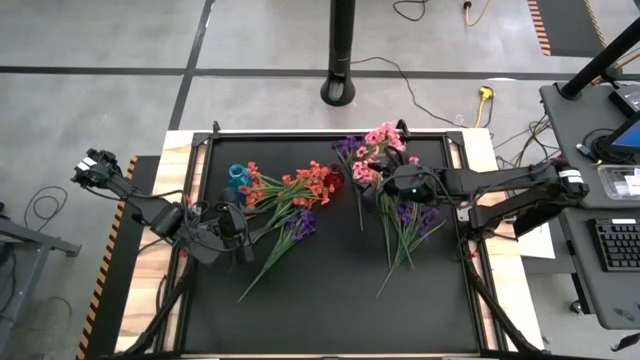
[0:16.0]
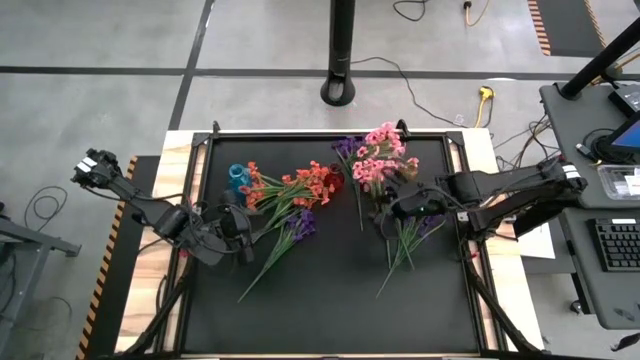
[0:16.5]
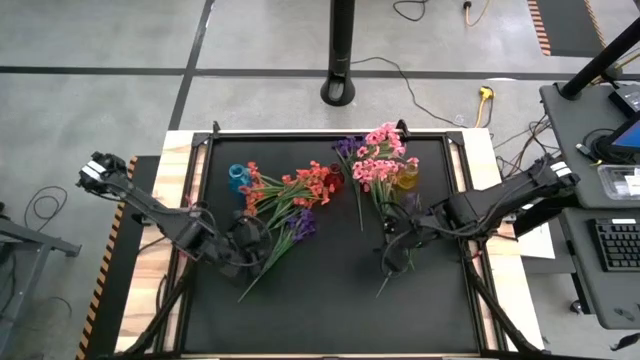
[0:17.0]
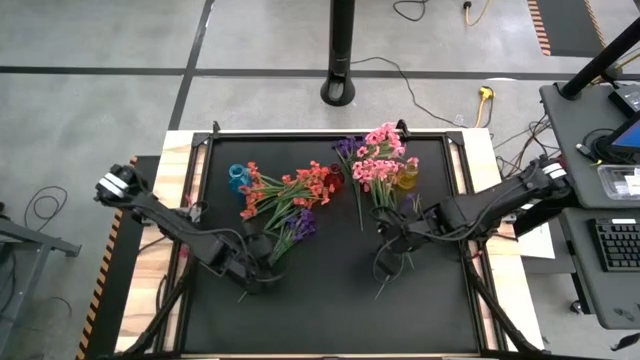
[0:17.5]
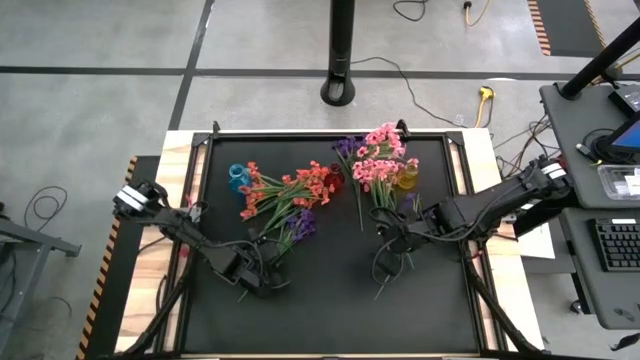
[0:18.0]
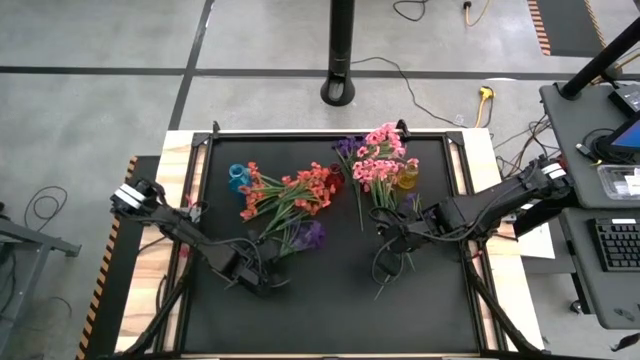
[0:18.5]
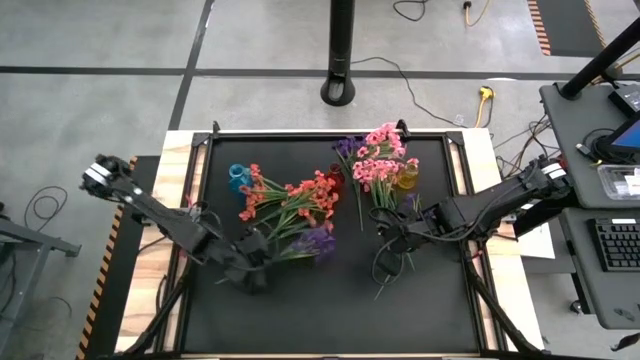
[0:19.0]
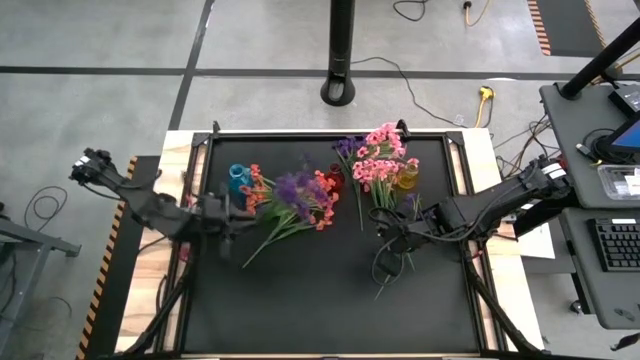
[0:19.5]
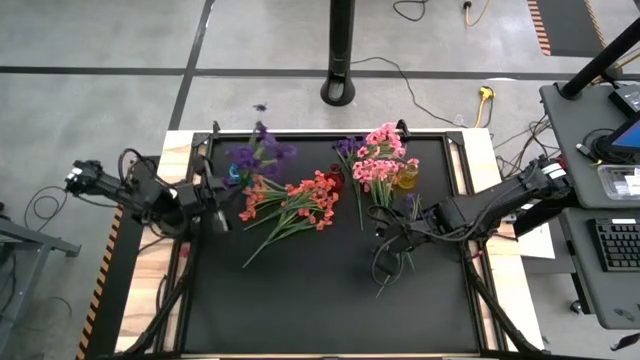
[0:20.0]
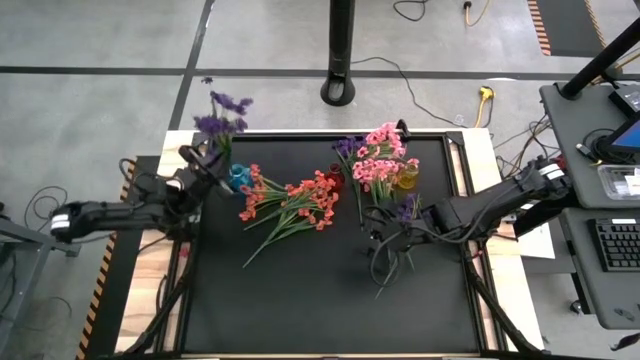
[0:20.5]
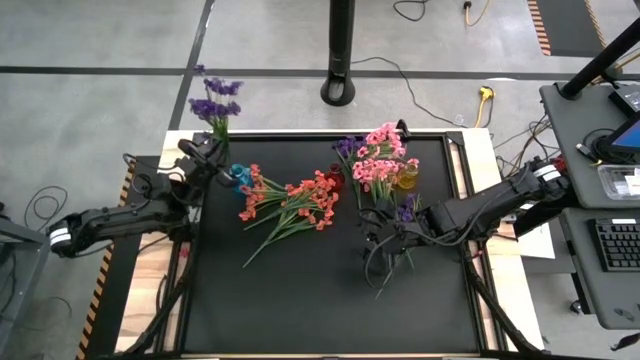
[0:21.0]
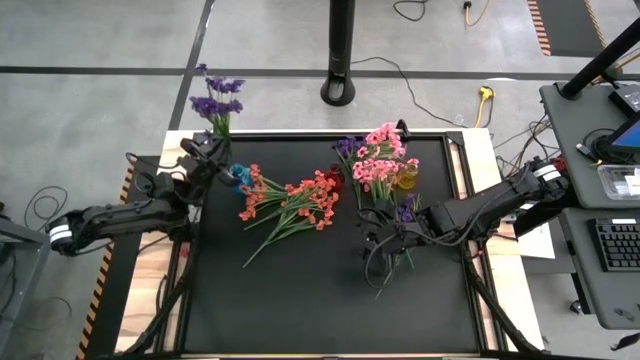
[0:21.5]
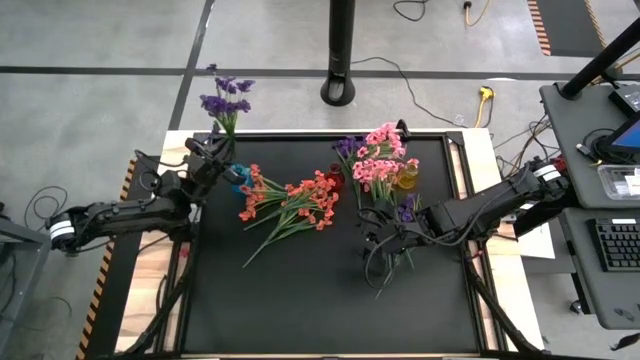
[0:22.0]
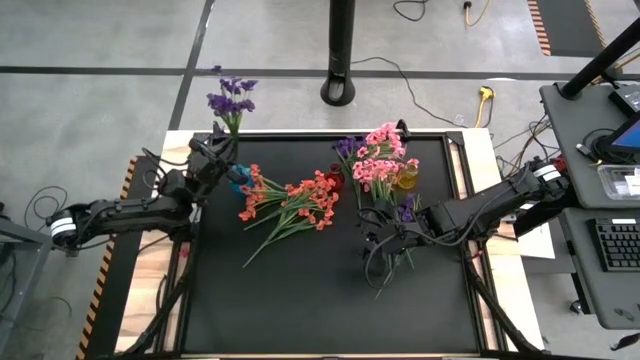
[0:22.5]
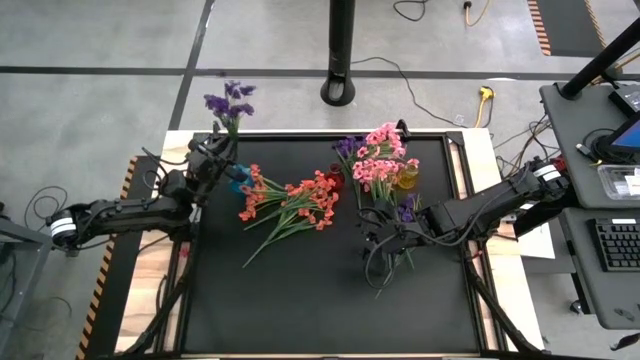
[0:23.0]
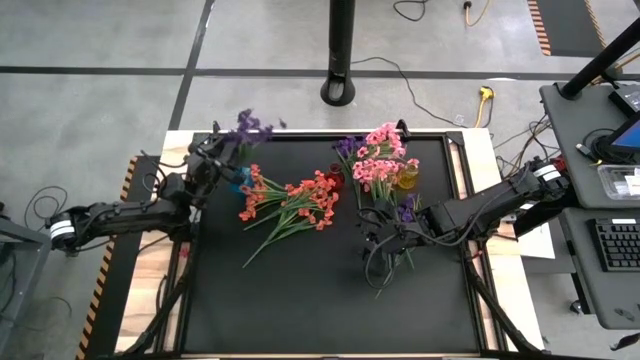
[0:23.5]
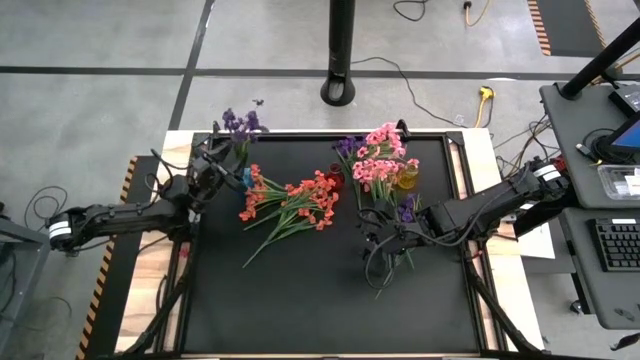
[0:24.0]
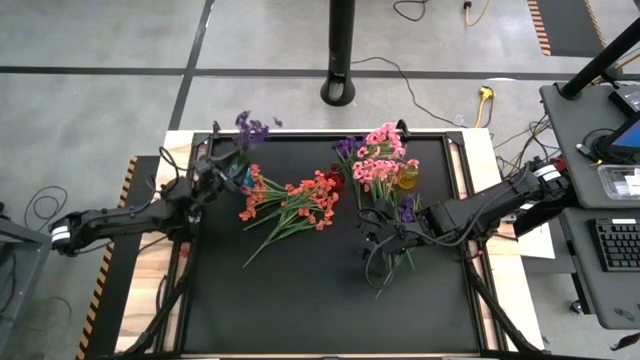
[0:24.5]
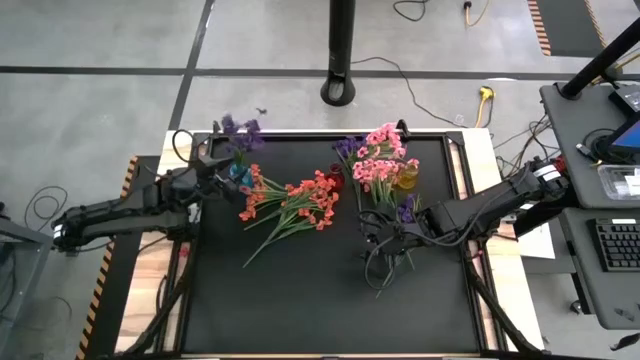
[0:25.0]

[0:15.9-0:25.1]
Task: Sort flowers into vase by color
Put the bottom left purple flower into the blue vase

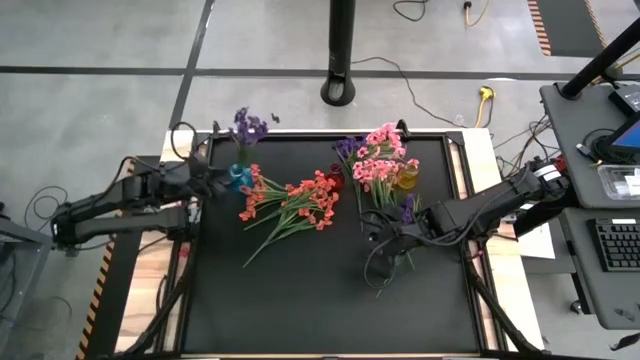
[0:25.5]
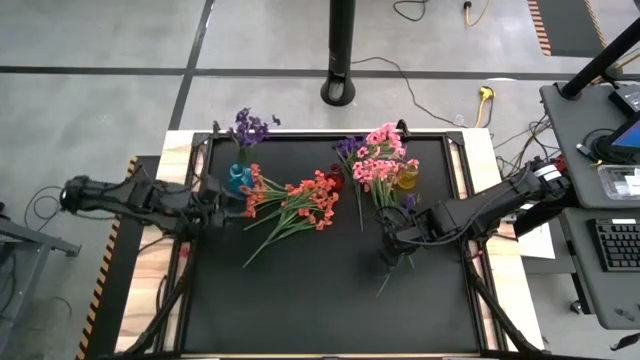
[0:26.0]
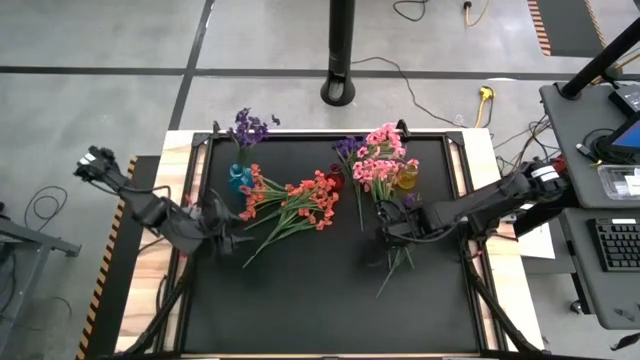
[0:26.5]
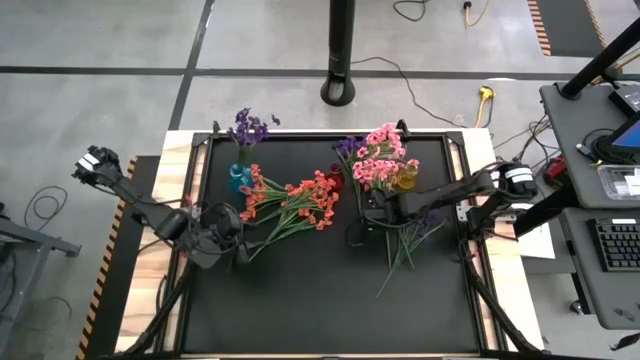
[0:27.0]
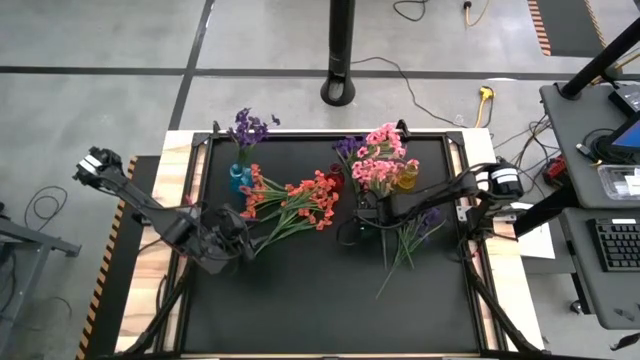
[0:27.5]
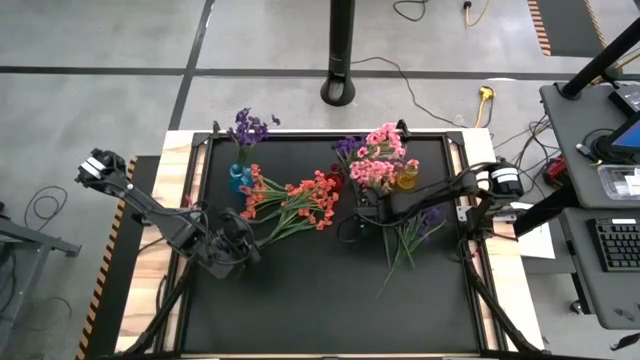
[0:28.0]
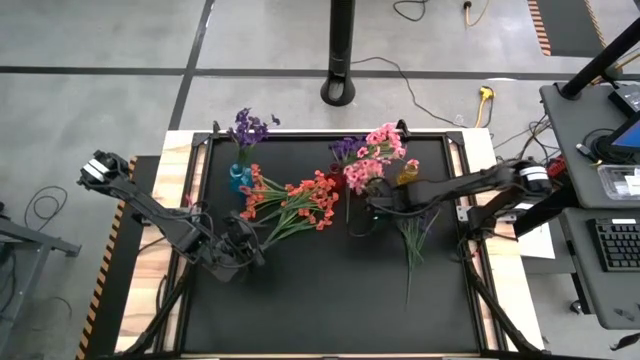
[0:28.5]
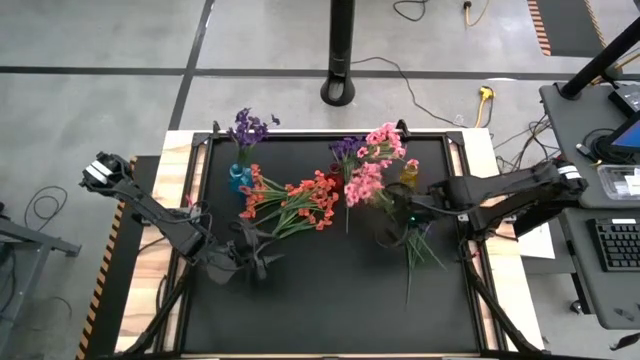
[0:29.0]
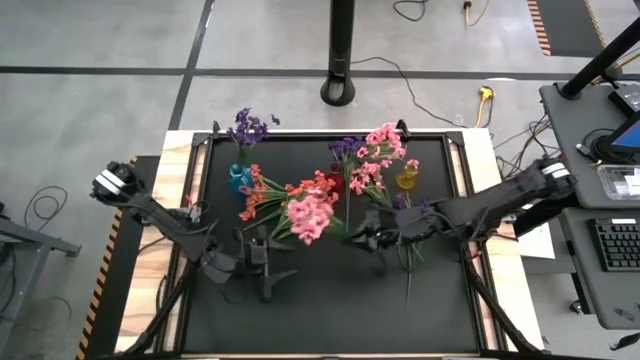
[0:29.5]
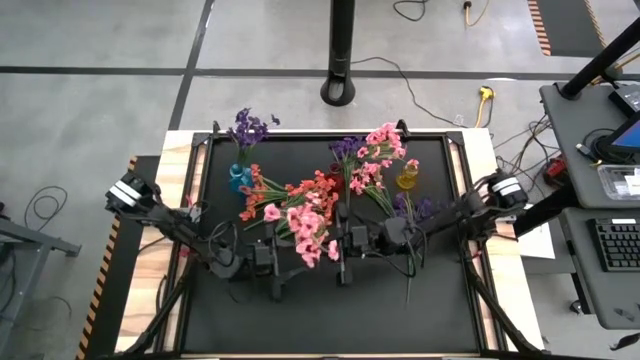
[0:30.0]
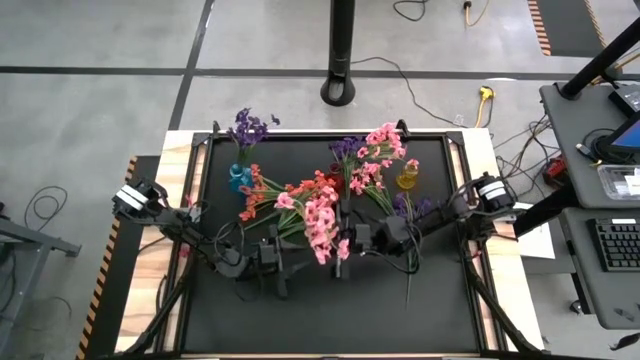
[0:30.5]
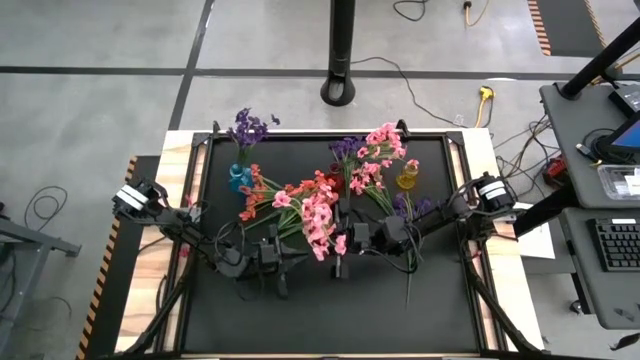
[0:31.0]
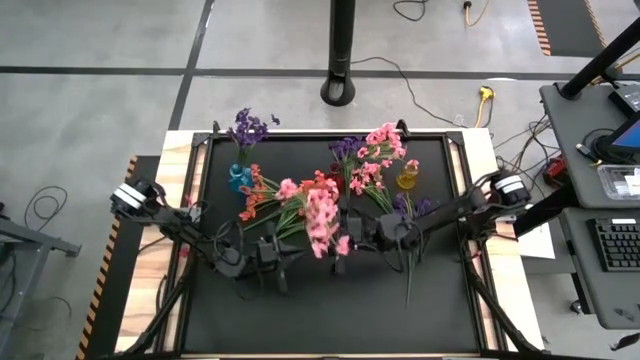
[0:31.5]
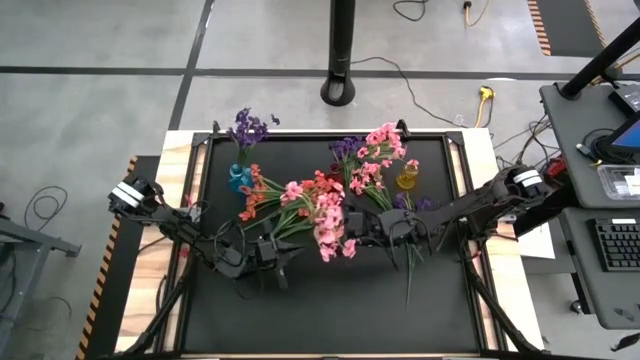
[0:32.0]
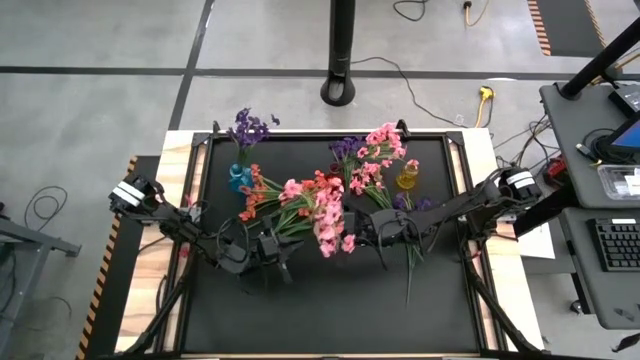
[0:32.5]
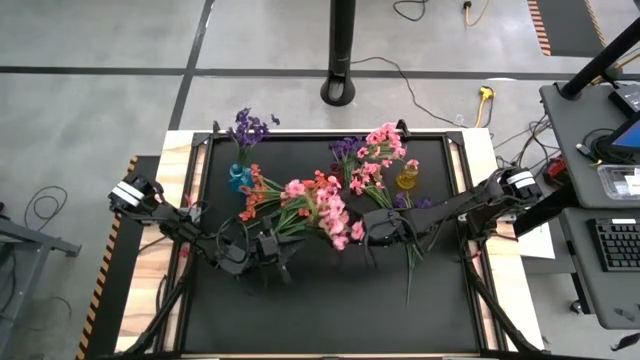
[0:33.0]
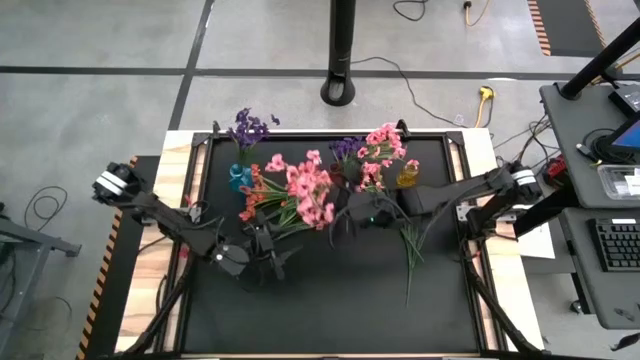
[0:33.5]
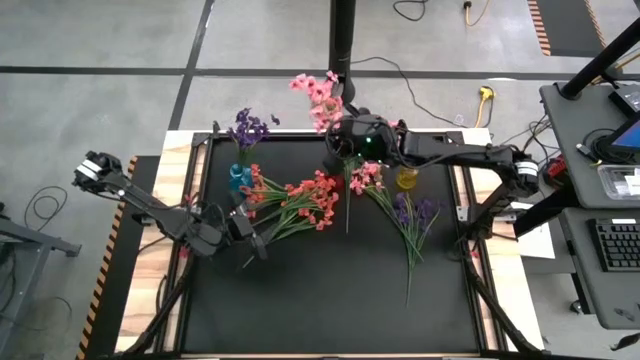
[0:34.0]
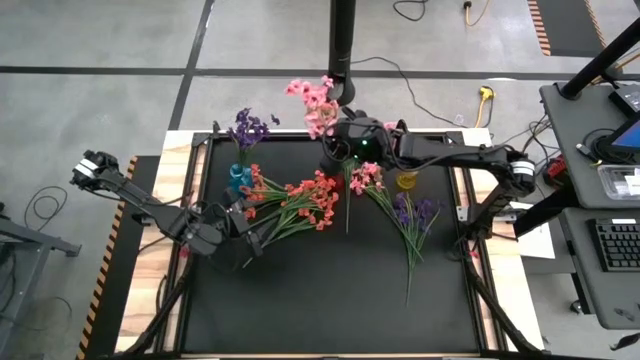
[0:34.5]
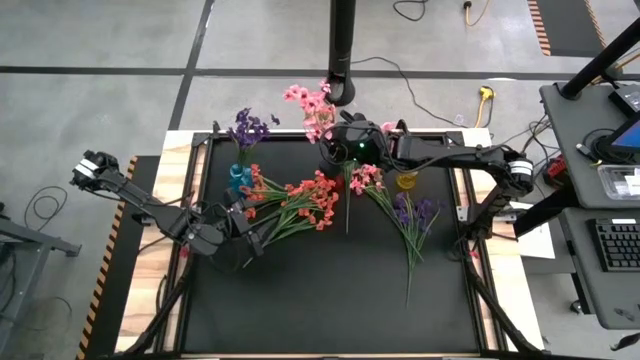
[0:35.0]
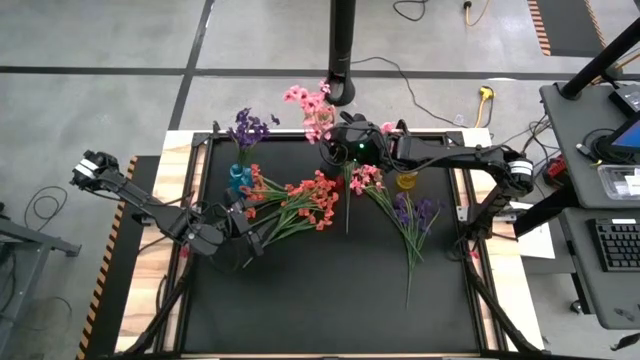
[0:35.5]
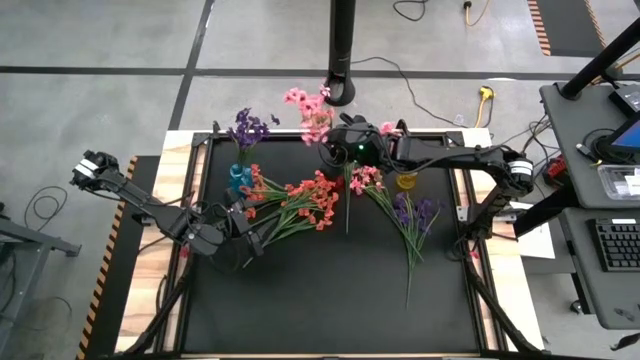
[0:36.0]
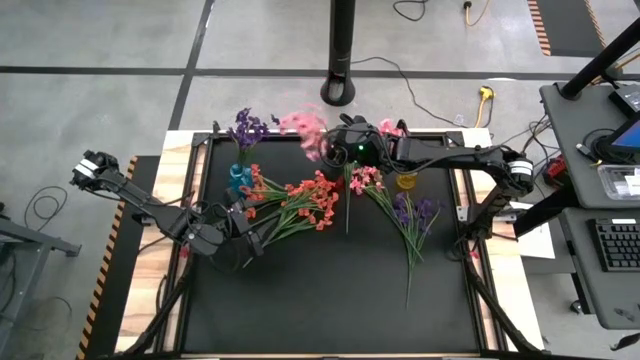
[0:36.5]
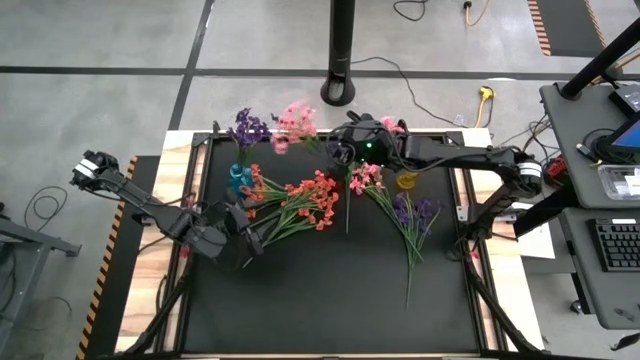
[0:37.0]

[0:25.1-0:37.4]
Put the bottom right pink flower into the red vase
